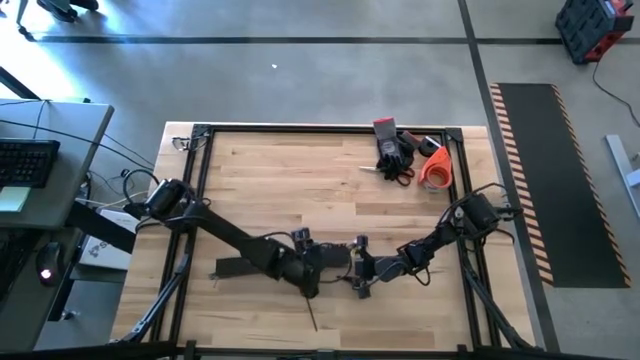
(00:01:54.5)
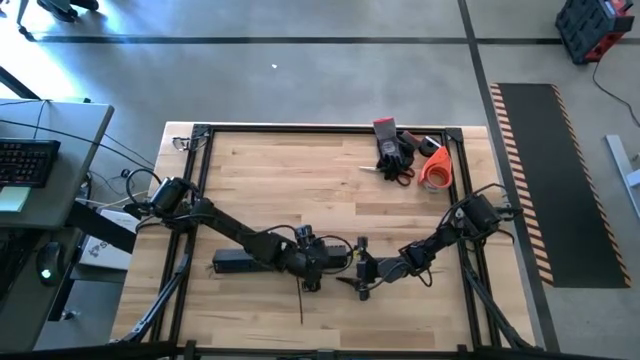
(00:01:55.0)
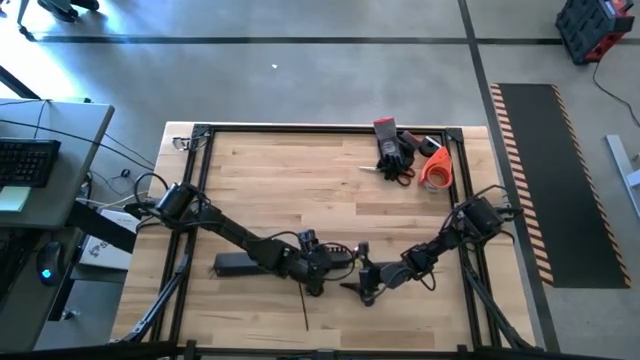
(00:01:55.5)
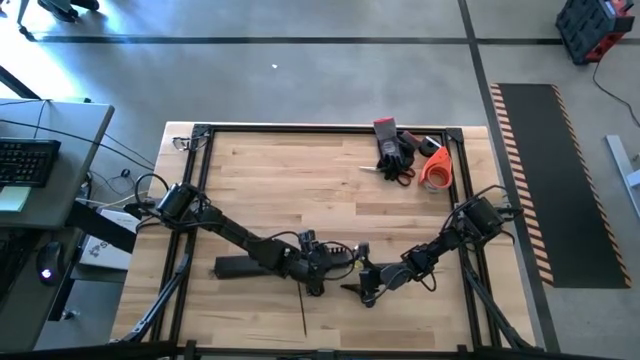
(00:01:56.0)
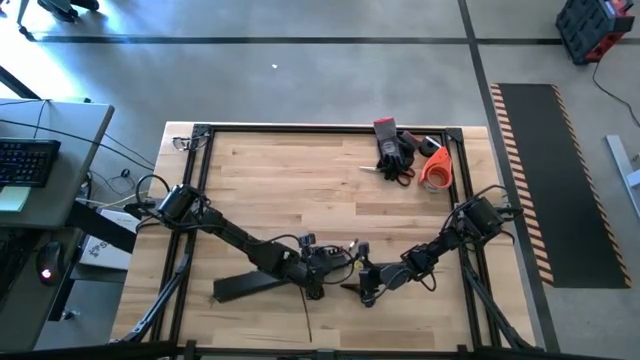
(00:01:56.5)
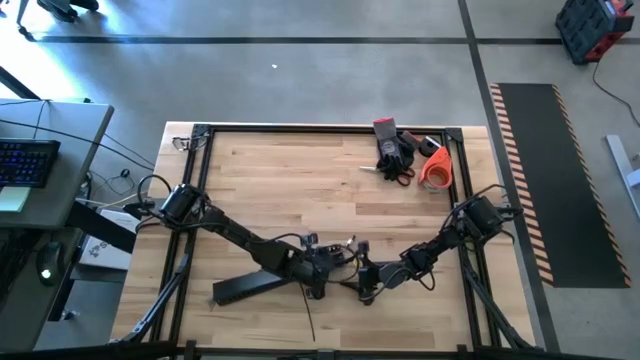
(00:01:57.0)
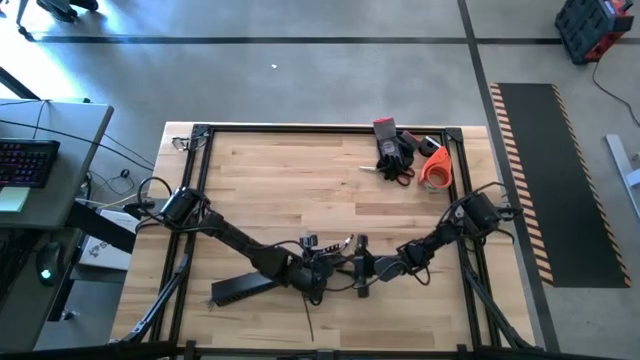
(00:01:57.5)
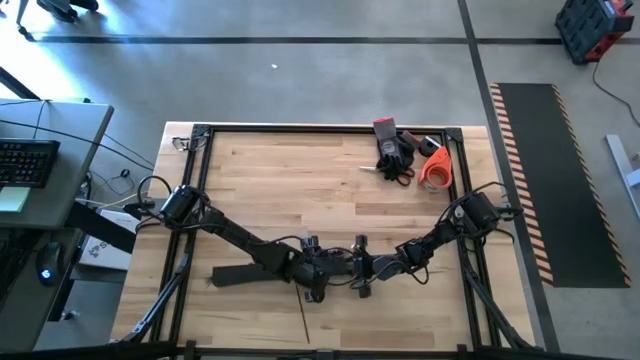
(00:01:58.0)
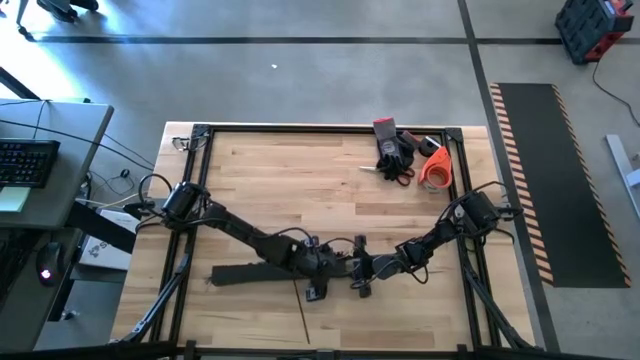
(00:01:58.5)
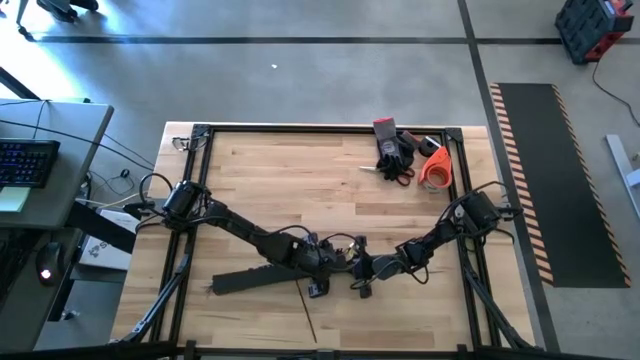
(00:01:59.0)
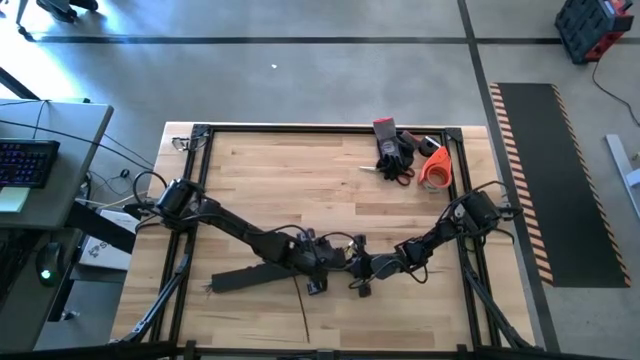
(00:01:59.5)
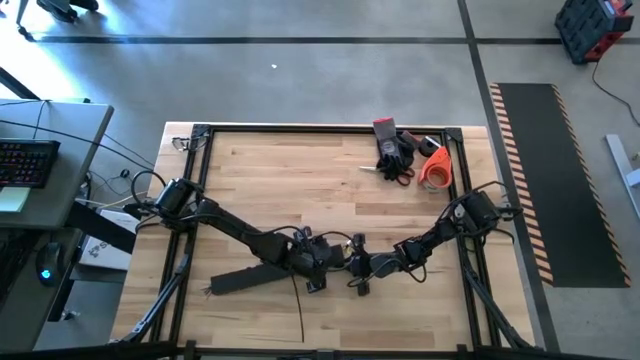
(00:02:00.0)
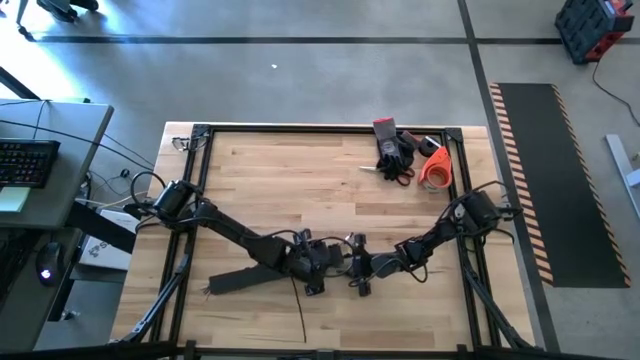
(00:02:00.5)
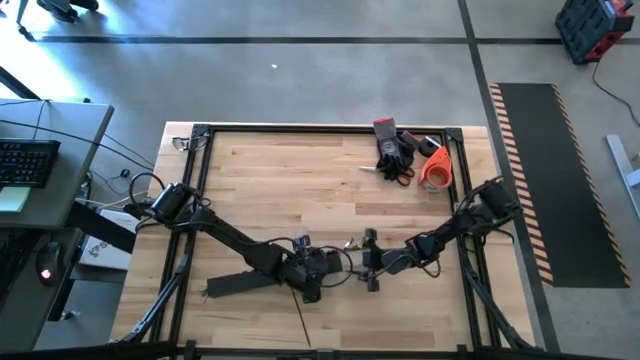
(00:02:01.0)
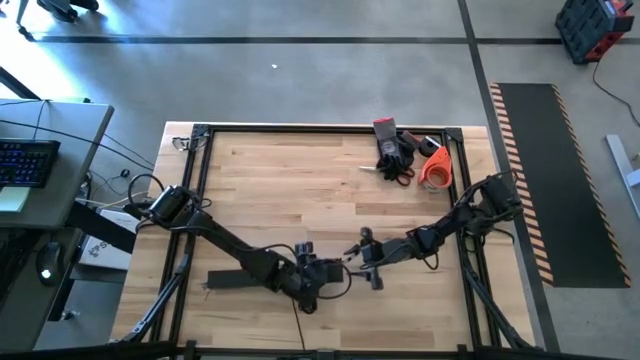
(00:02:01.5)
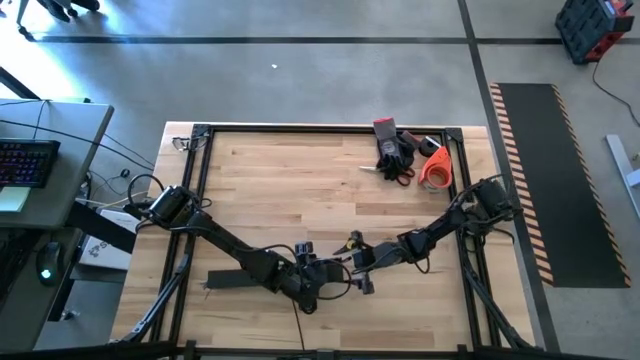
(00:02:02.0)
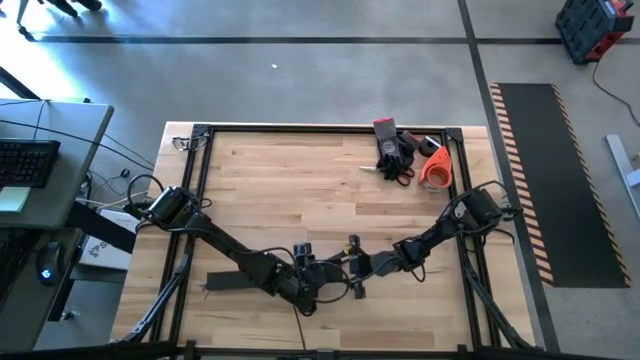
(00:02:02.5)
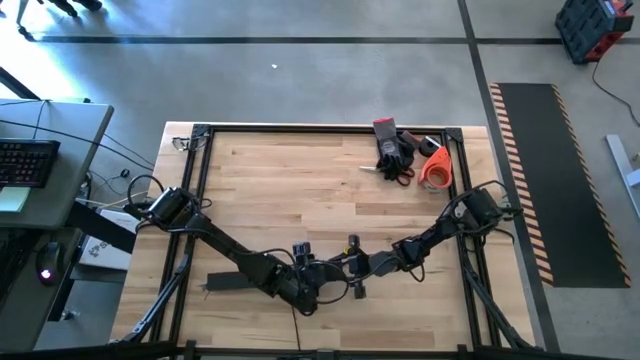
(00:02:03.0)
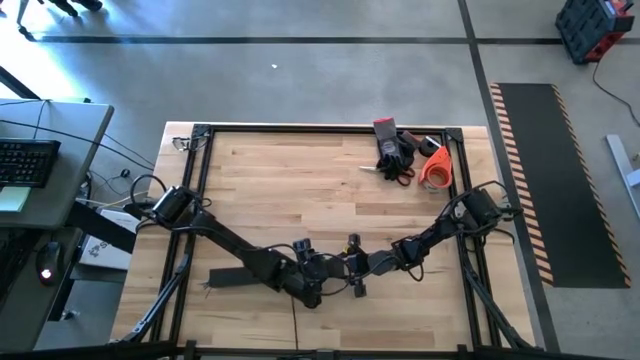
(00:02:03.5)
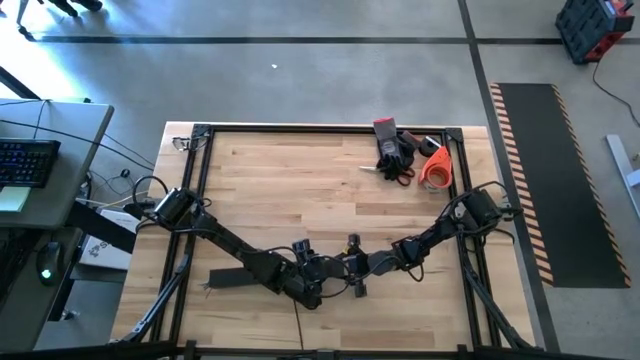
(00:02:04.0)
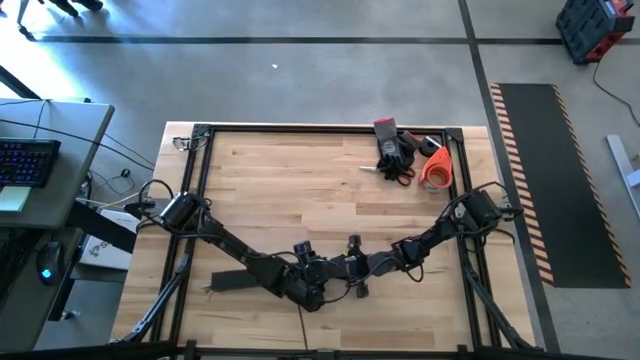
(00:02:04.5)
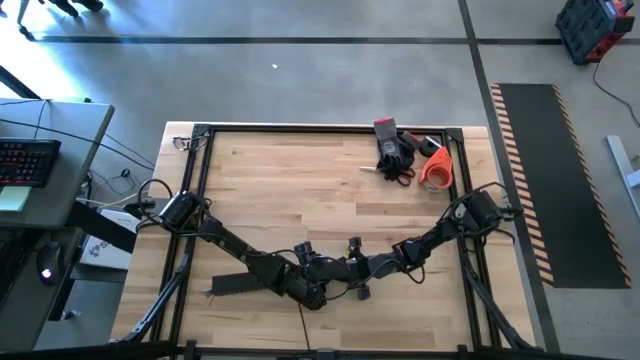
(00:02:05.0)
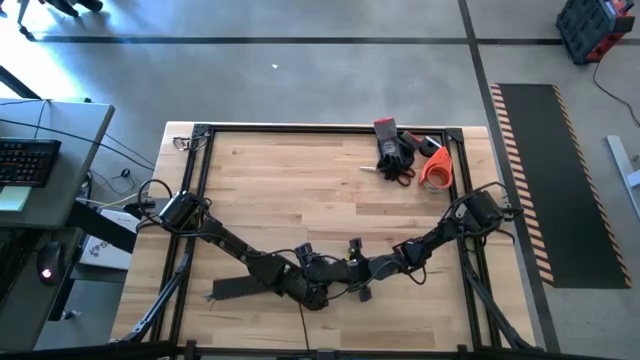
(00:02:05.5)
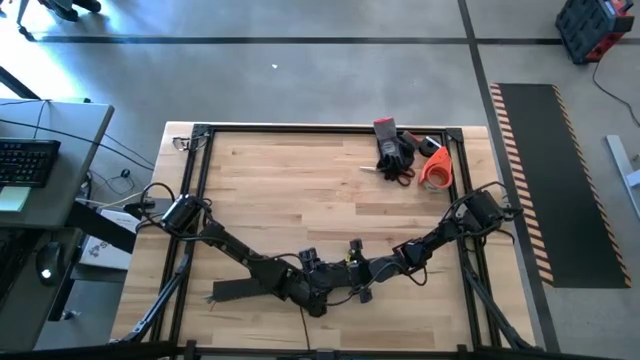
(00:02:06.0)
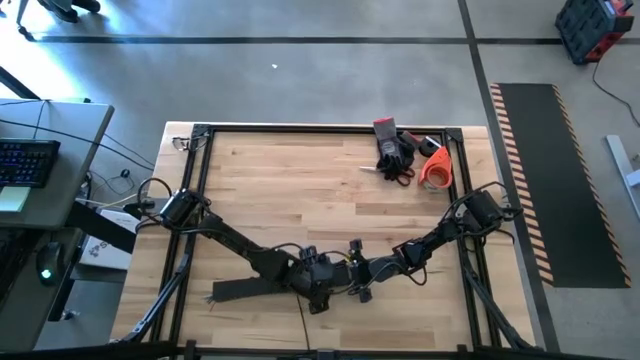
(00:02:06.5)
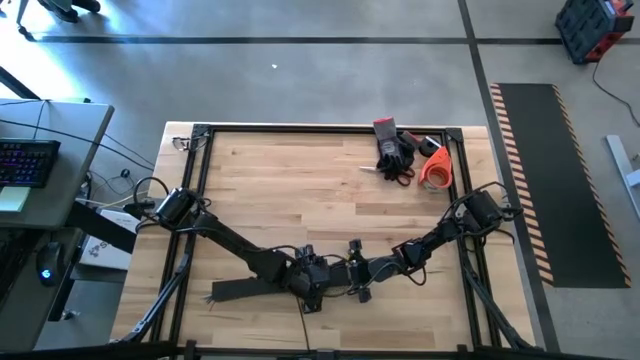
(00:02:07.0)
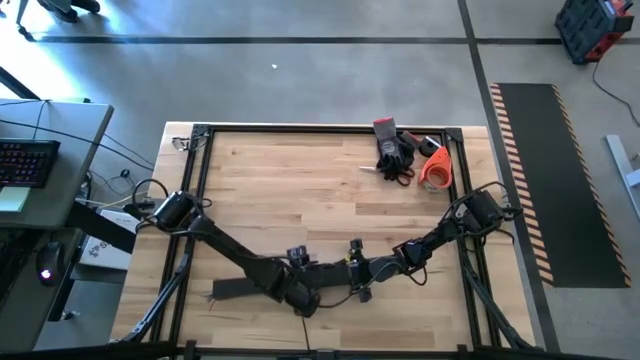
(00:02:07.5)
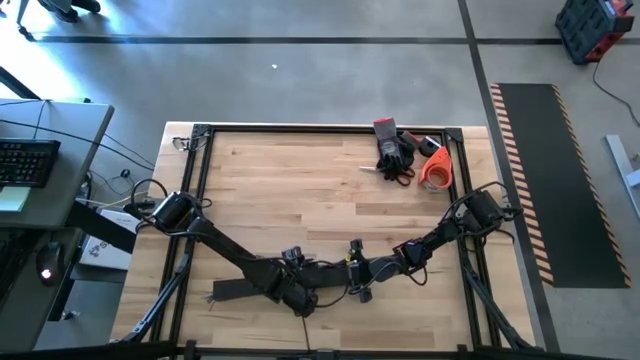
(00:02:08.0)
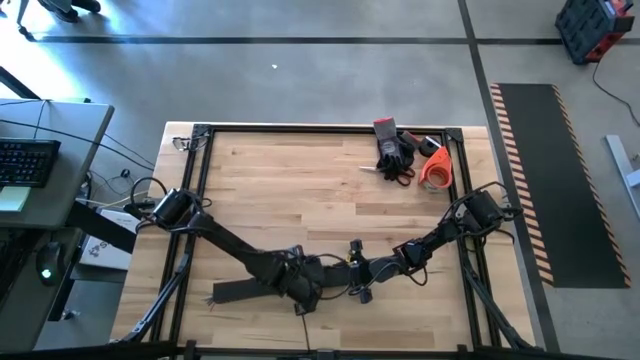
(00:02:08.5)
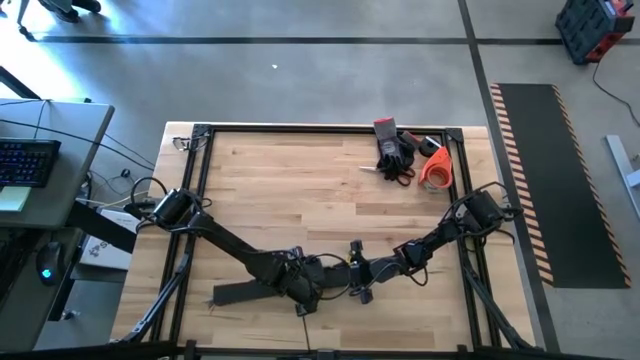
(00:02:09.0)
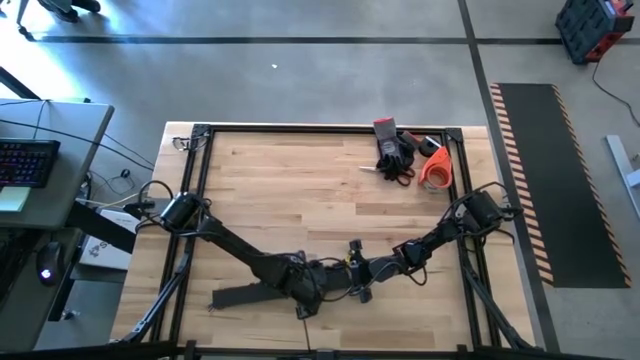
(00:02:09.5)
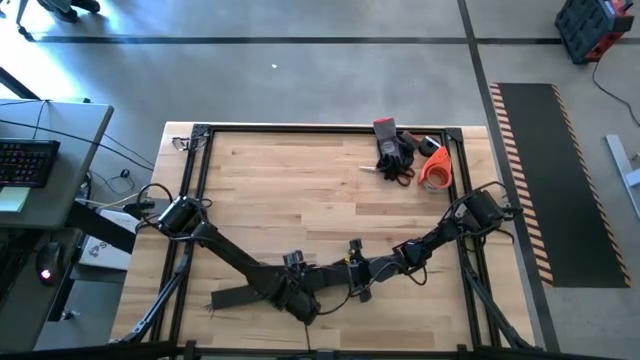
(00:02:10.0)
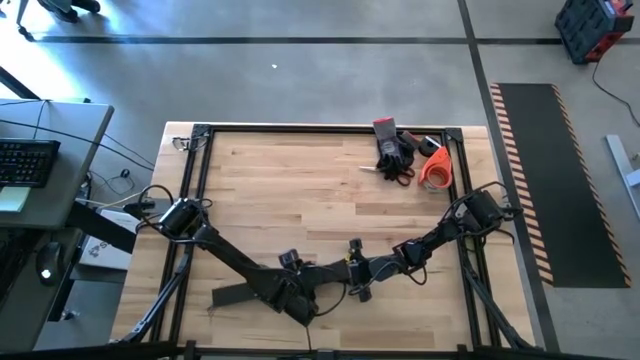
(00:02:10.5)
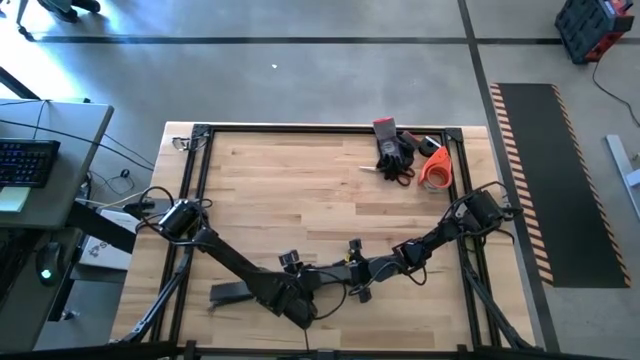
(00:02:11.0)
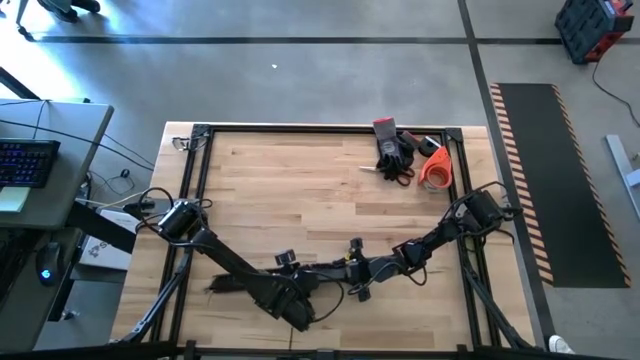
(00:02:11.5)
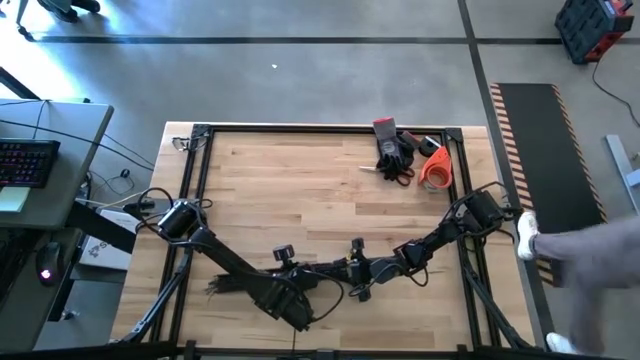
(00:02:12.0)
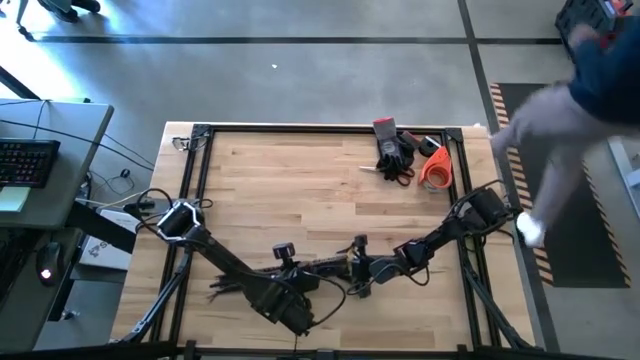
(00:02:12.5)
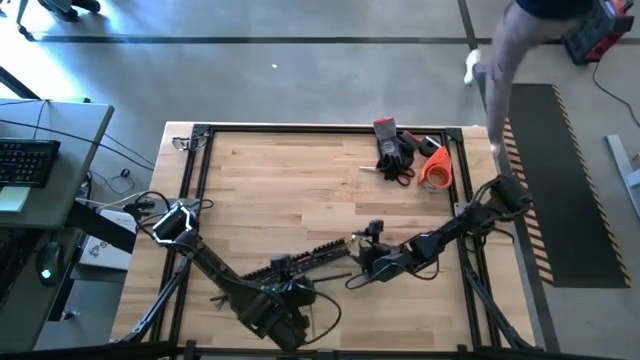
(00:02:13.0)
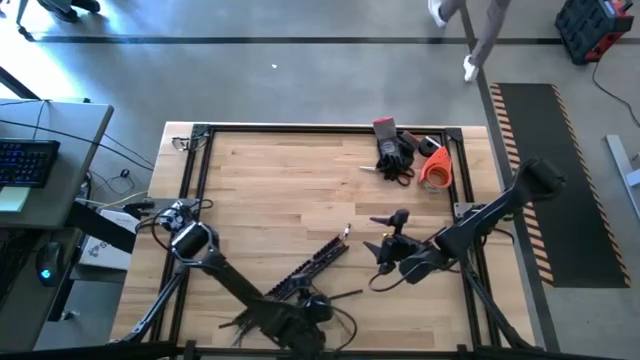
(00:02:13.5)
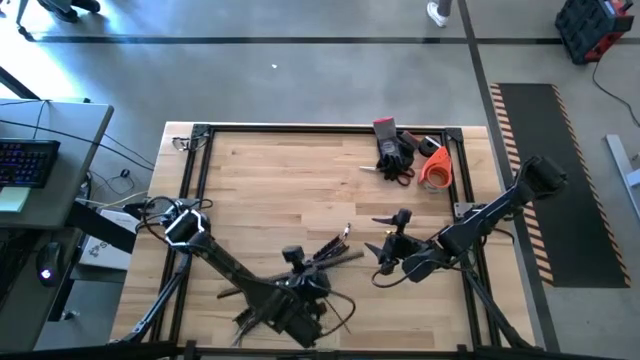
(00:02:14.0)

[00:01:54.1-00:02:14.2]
Task: Ziptie cables
Close the black cable duct with the black cable duct cover
